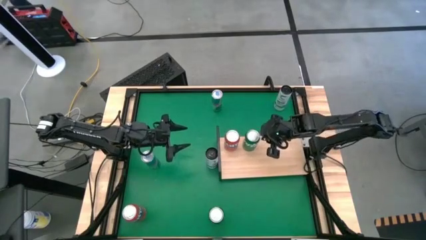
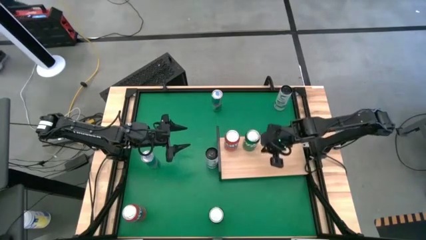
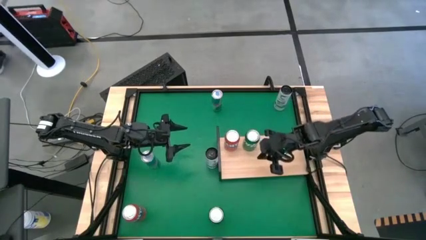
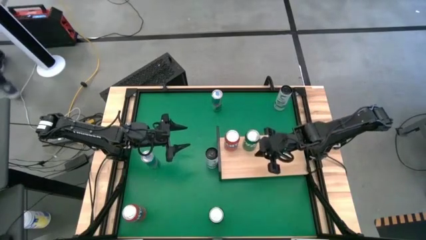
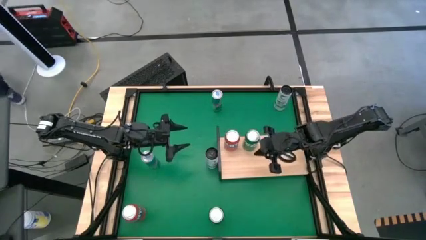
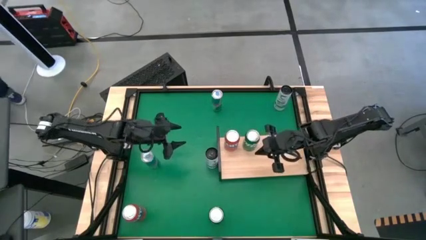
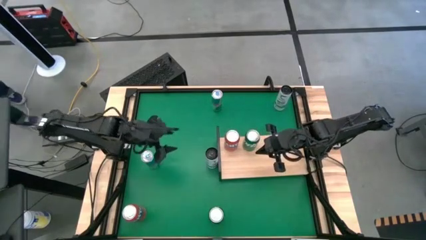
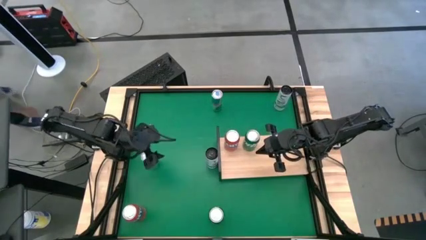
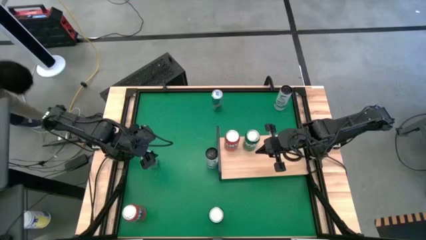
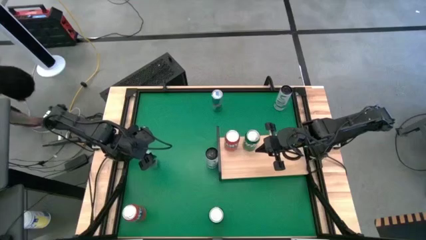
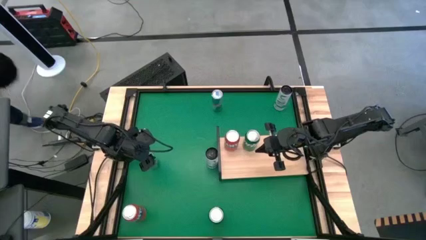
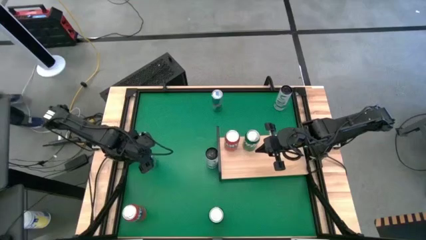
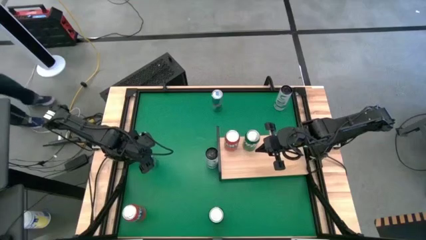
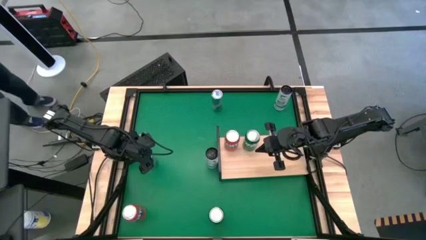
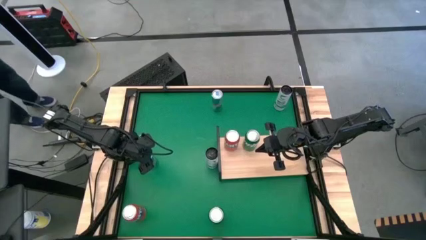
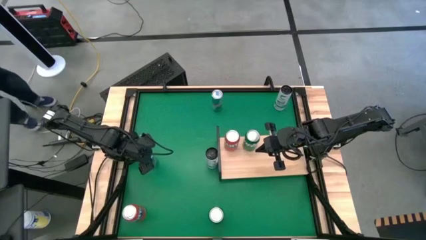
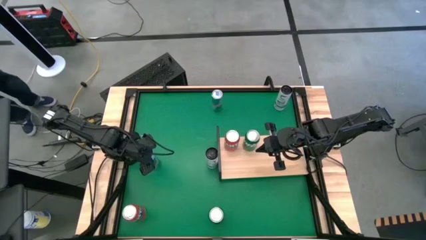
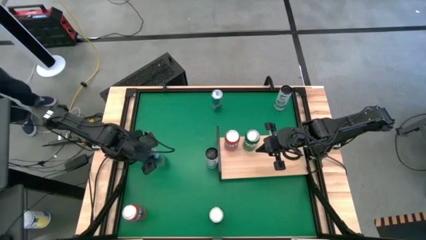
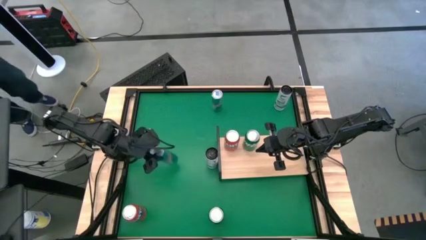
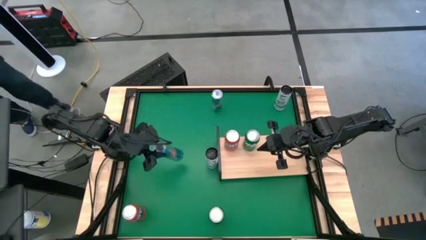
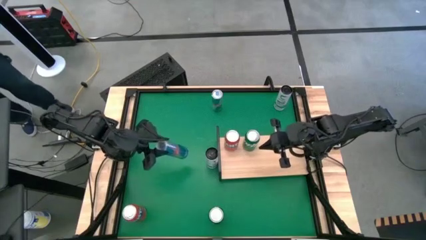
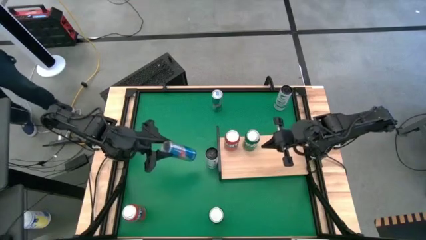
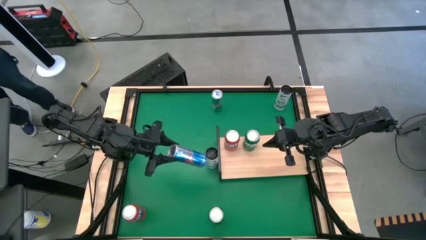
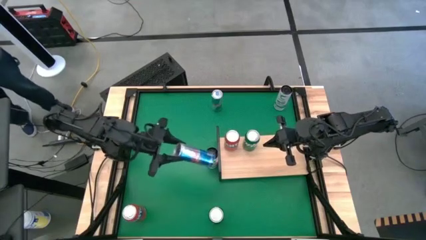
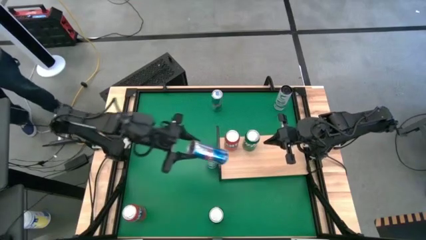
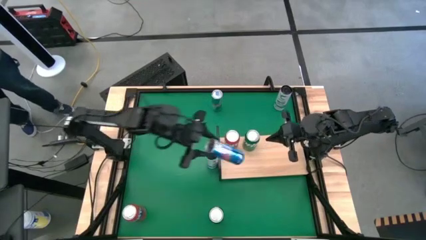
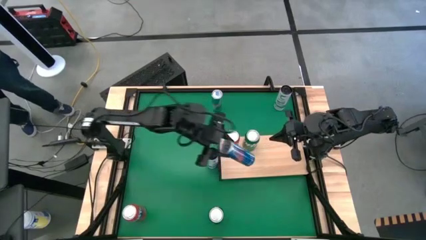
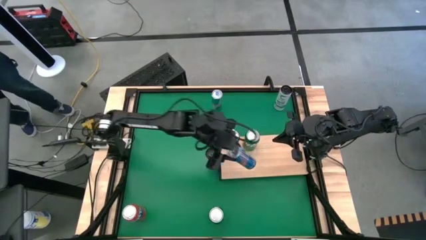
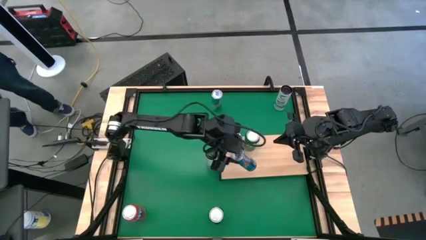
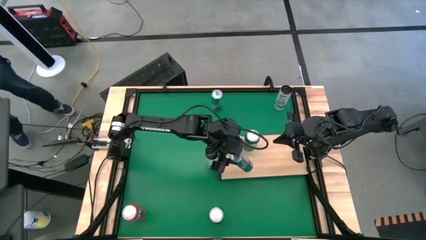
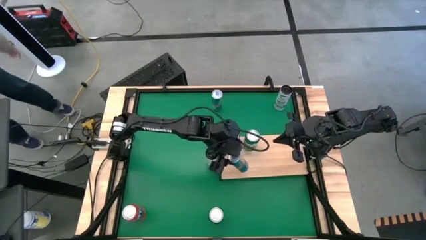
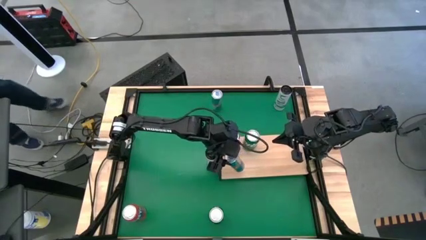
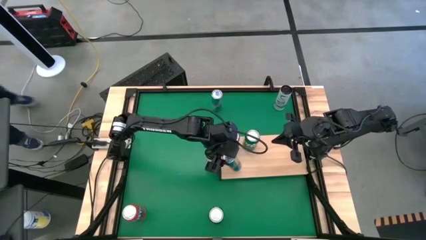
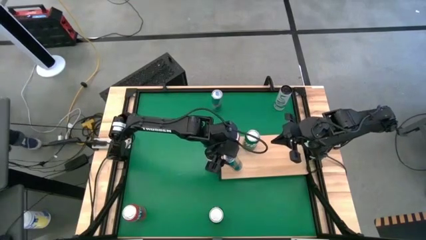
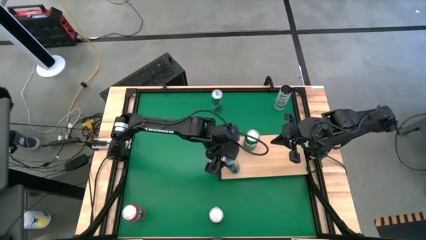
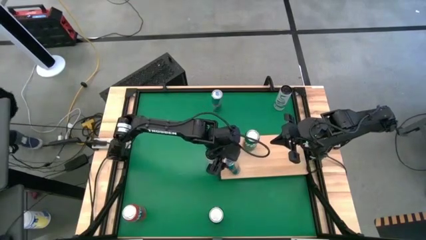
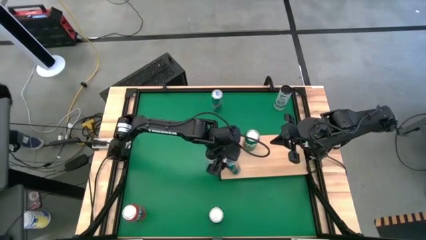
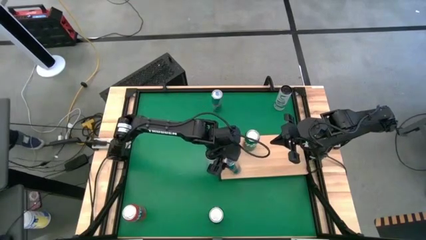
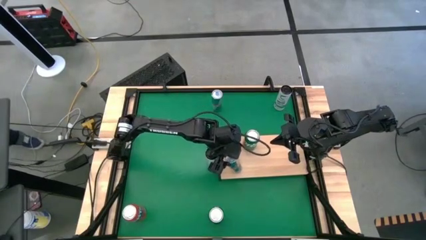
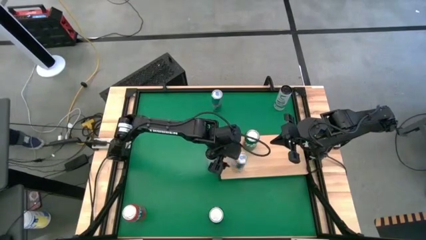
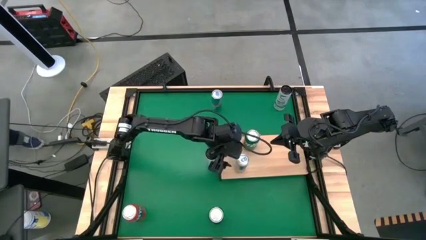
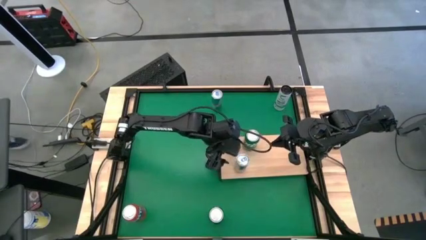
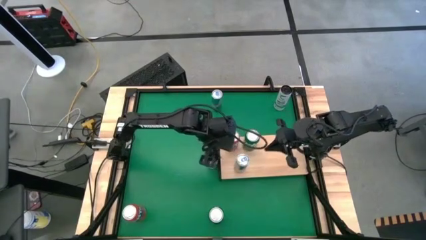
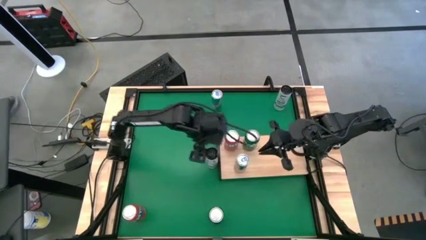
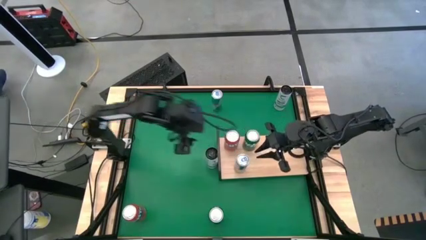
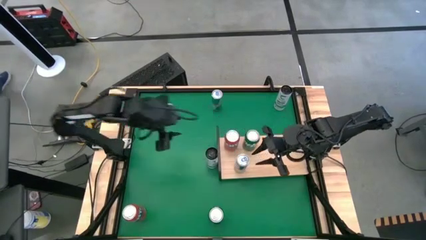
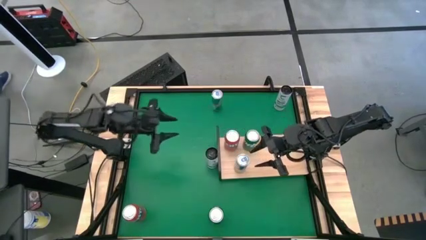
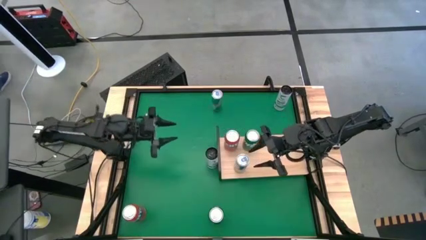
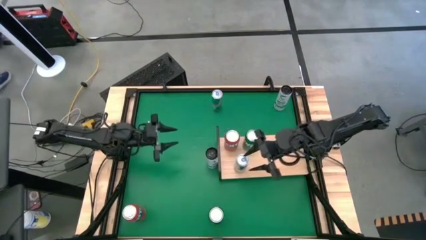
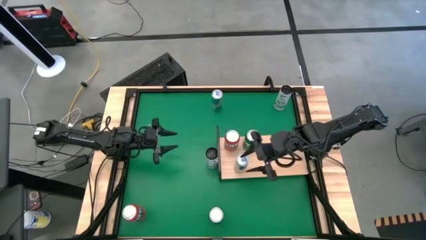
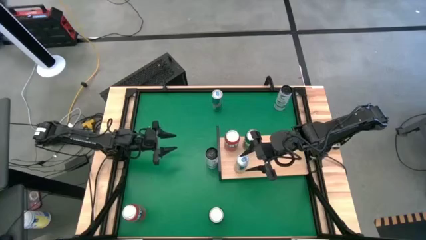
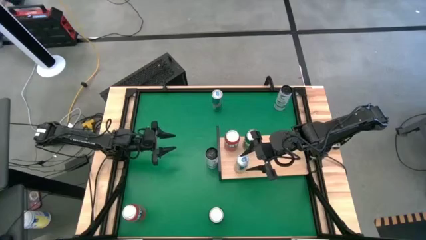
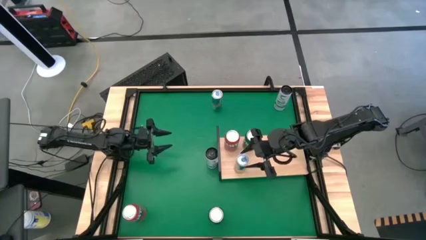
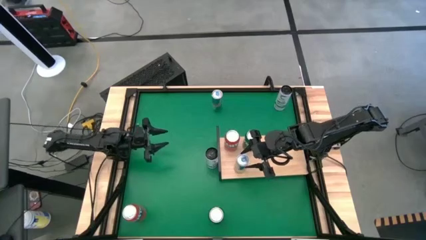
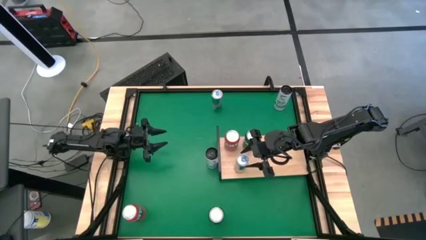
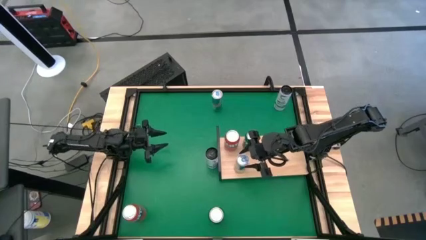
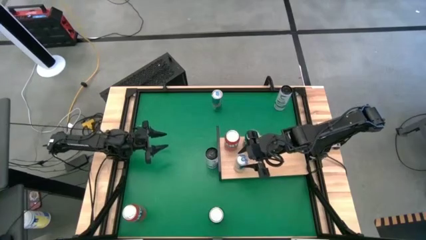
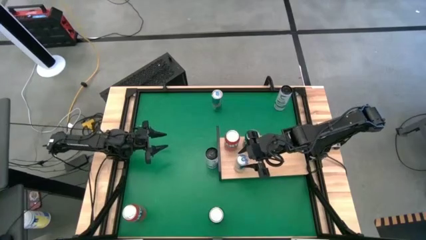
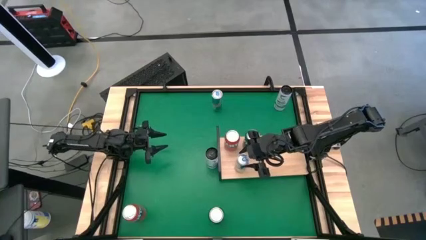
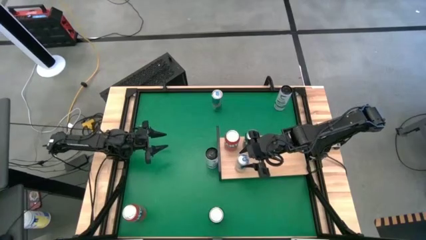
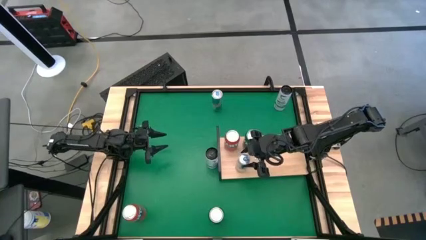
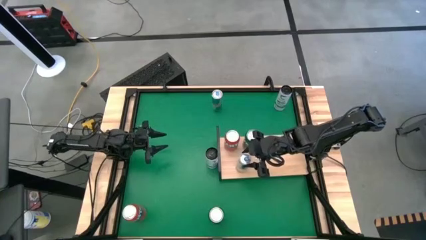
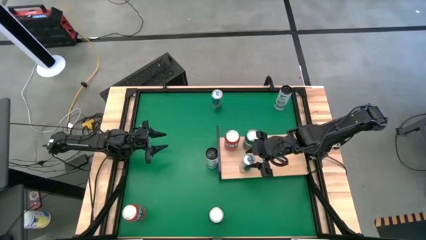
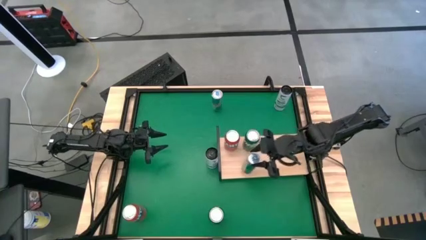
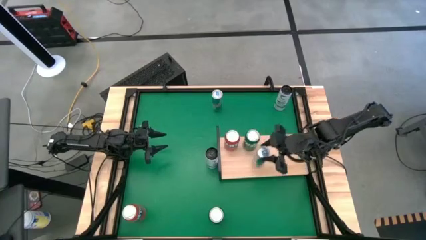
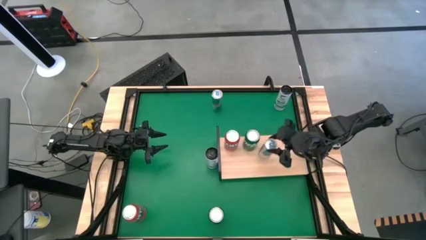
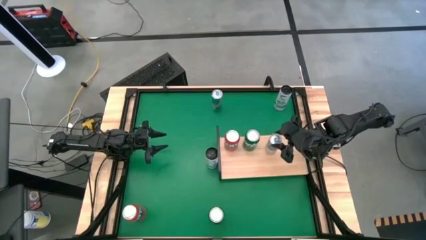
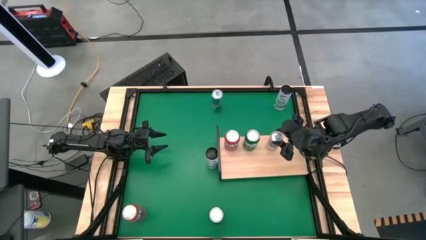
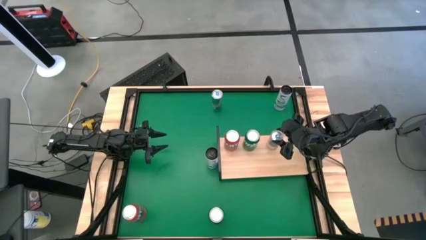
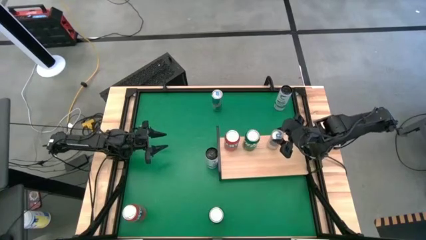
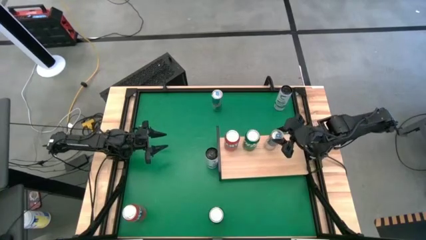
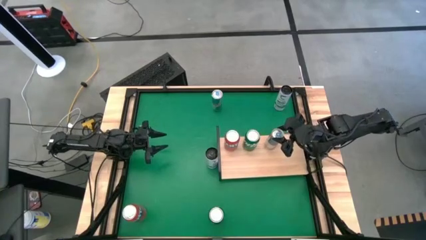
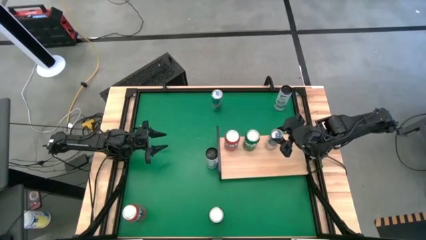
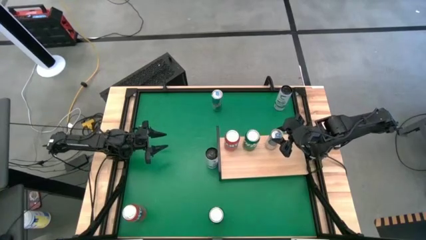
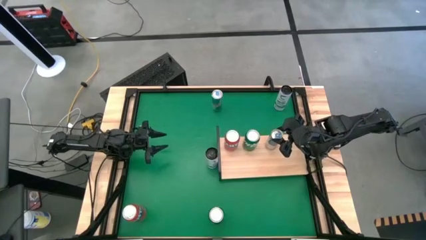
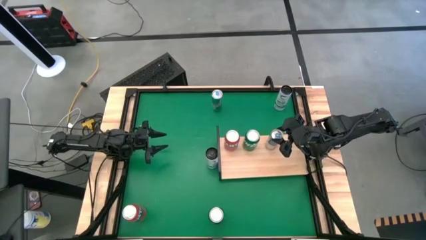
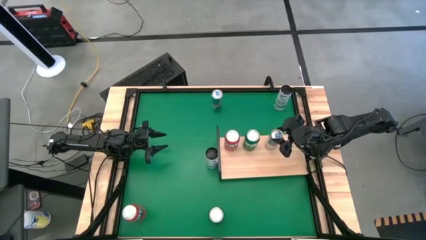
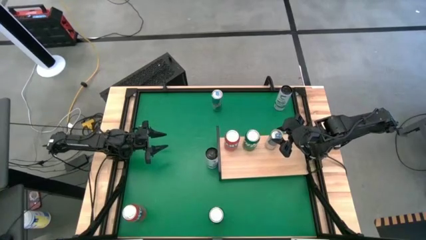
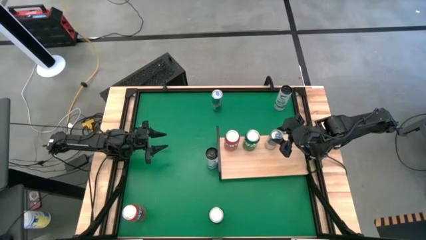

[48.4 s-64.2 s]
Task: Place canned beverage on shelf
Put the bottom blue soda can on the shelf

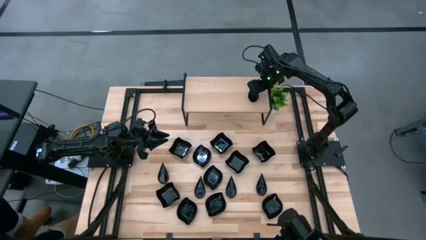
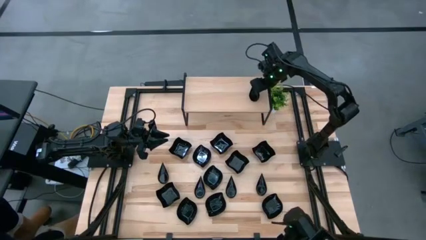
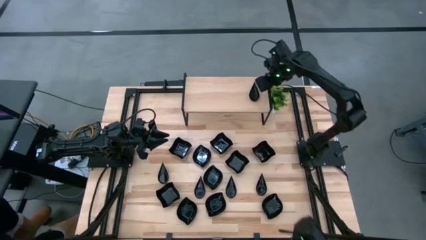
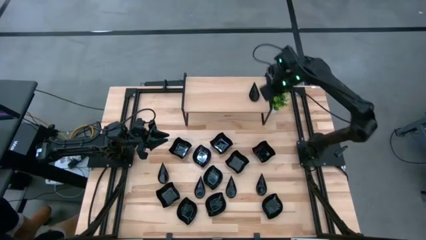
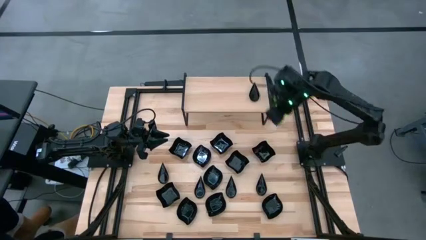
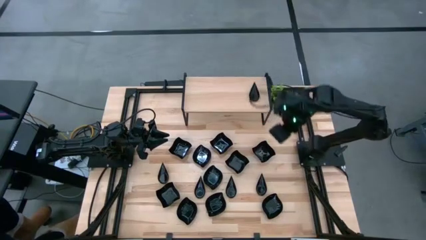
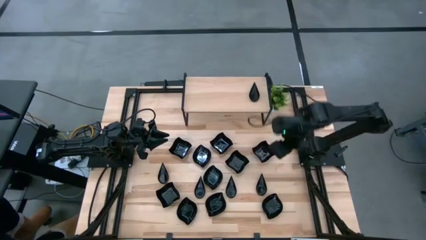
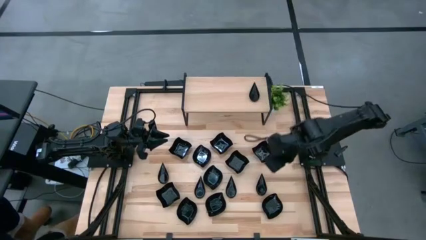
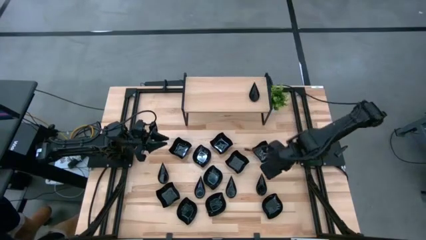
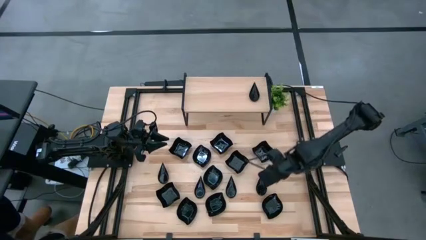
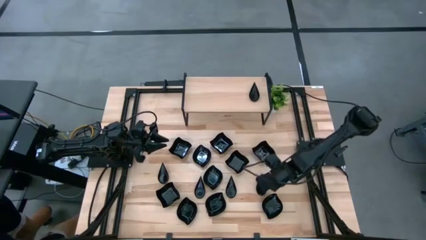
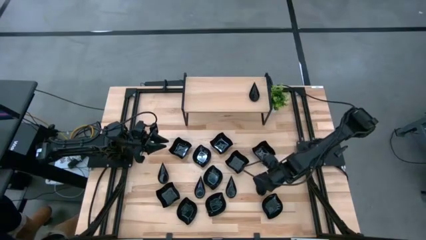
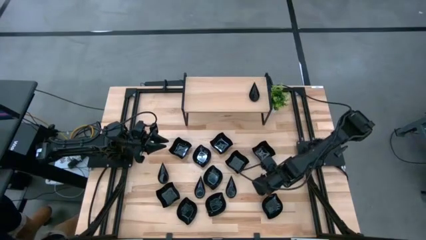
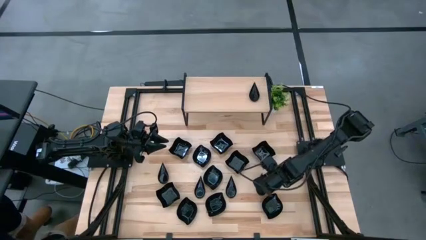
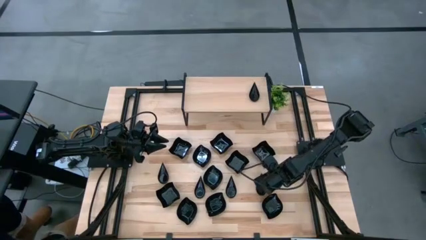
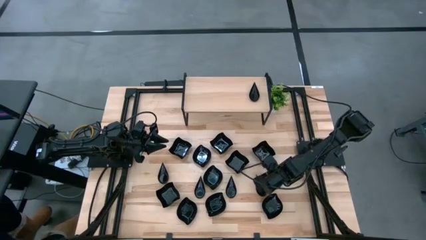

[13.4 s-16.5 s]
Task: Pick & Place Mini shaped plates
Stack the black drop shaped plate on top of the other black drop shaped plate on the shelf
